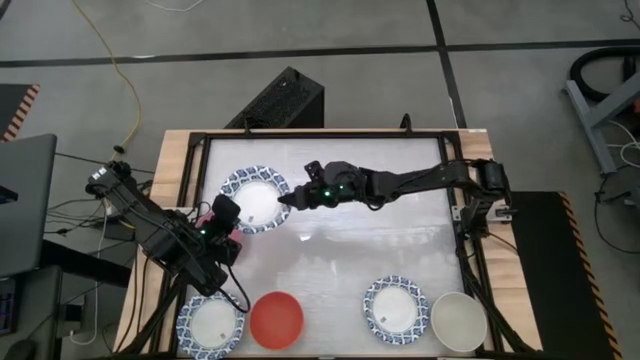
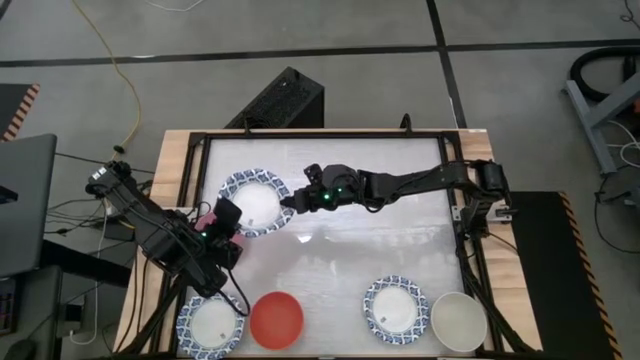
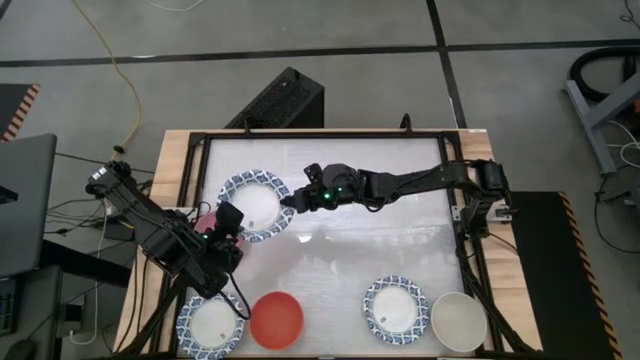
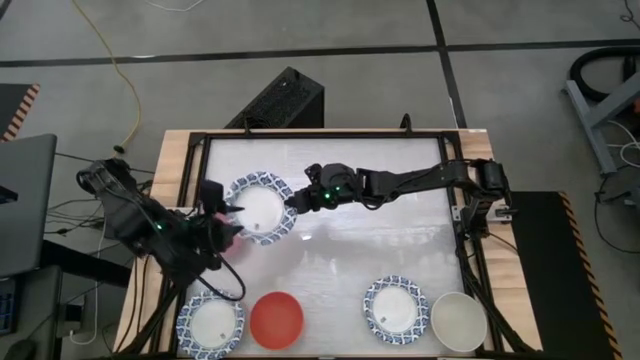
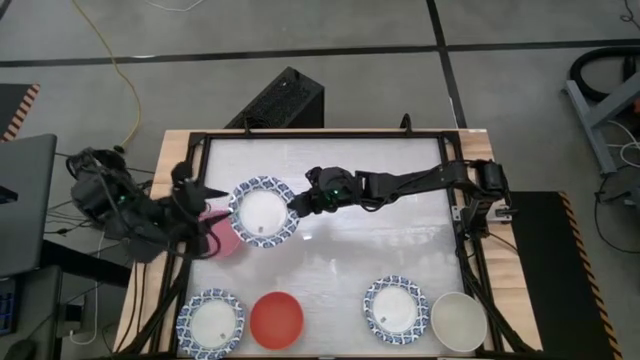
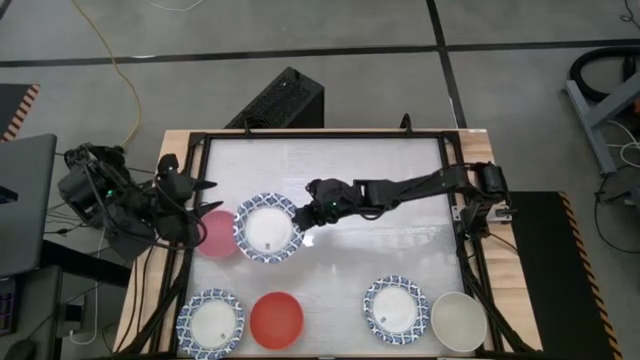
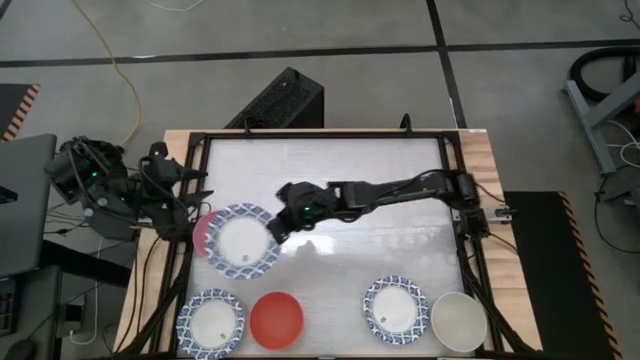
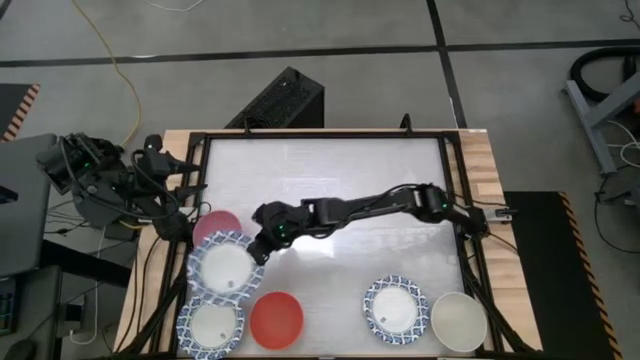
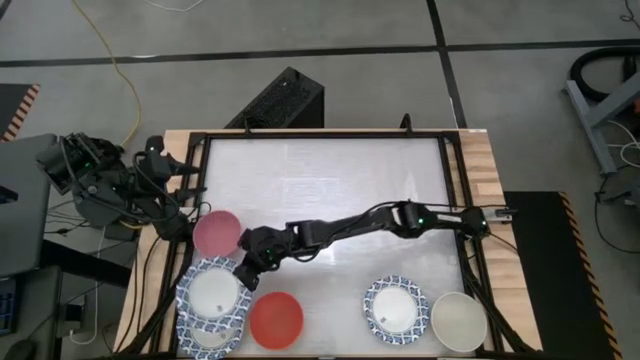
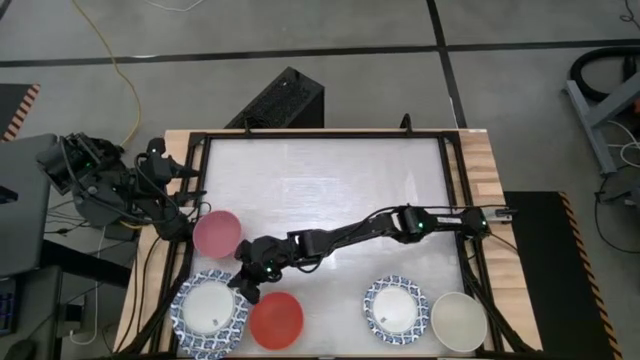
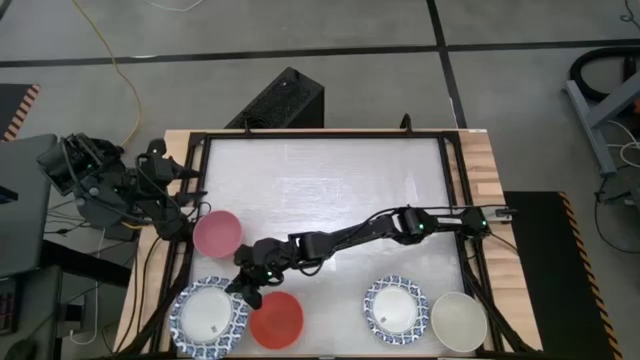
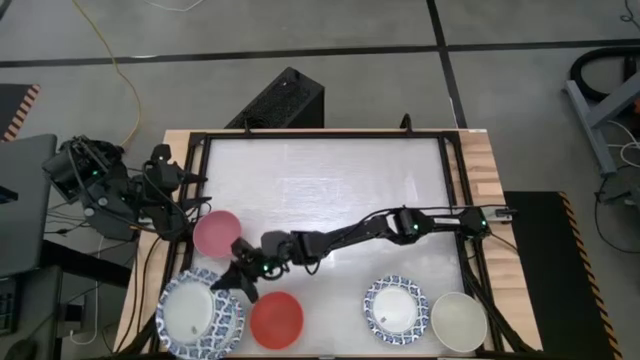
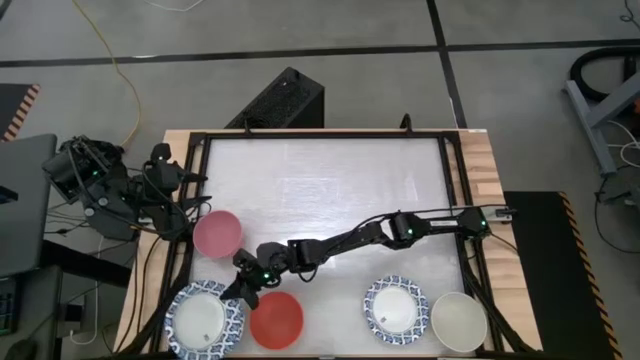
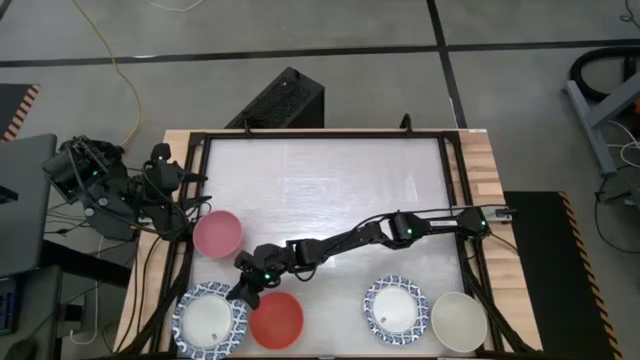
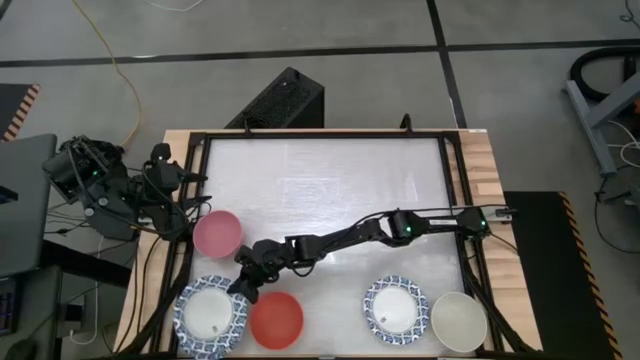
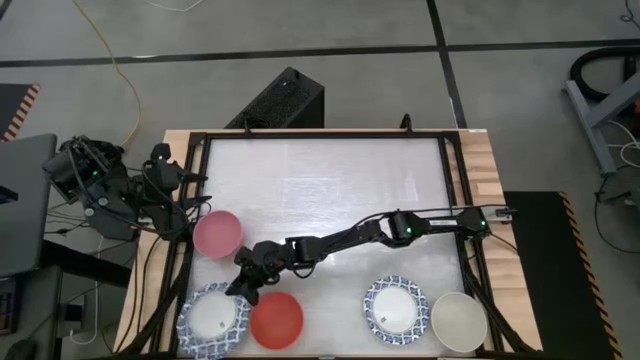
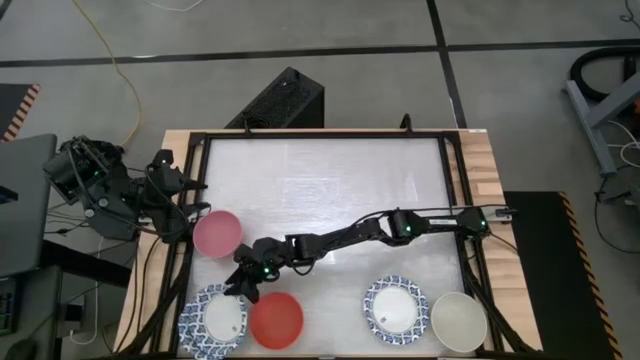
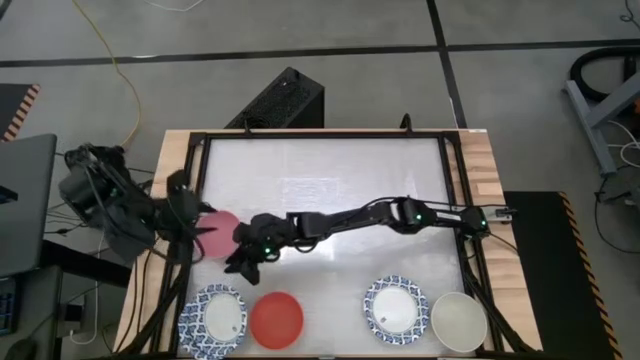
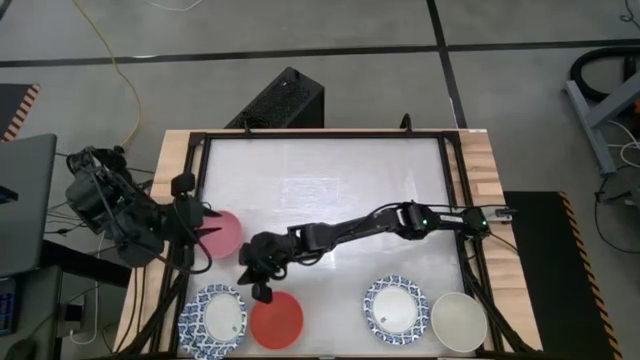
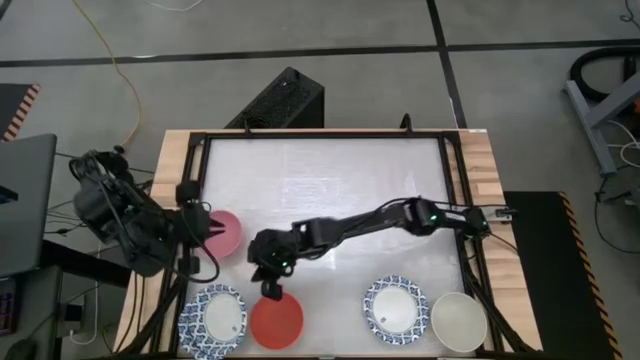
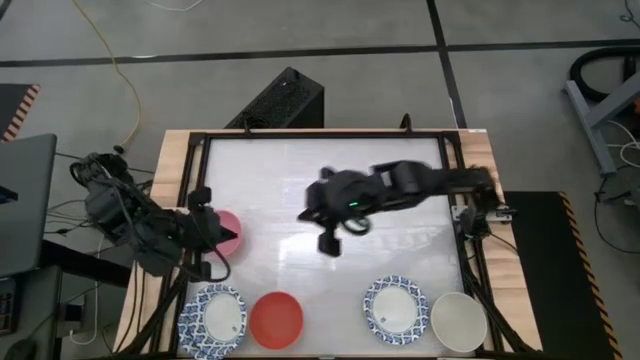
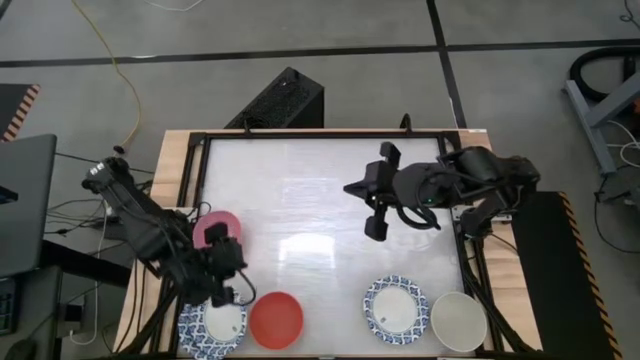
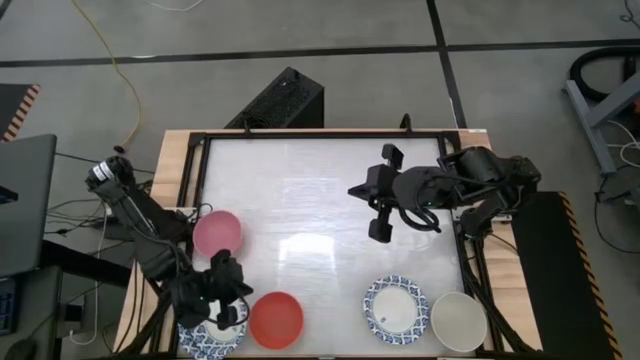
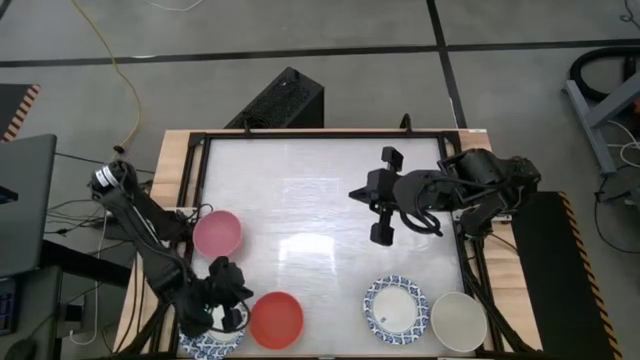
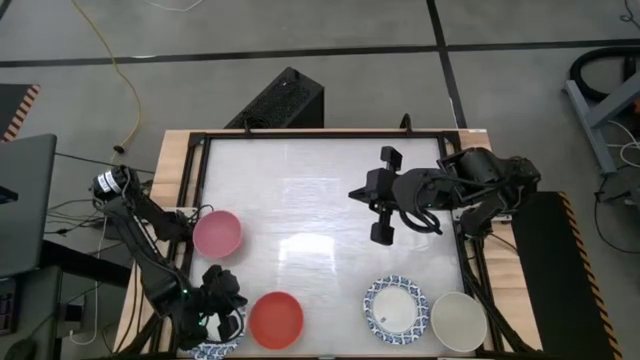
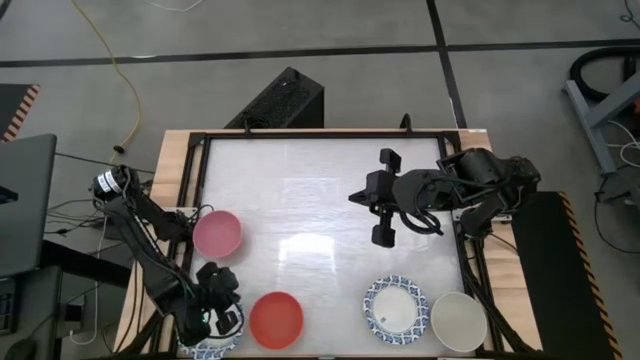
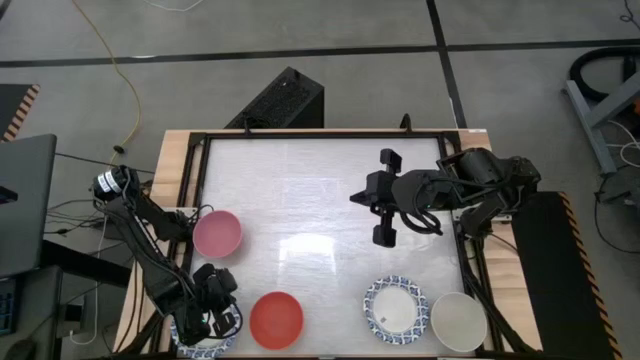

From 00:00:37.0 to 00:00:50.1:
Task: Nest bowls inside each other by size order
Stack the white bowl onto the stacked white bowls
